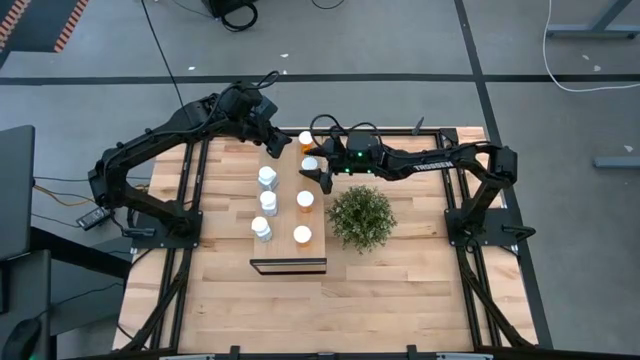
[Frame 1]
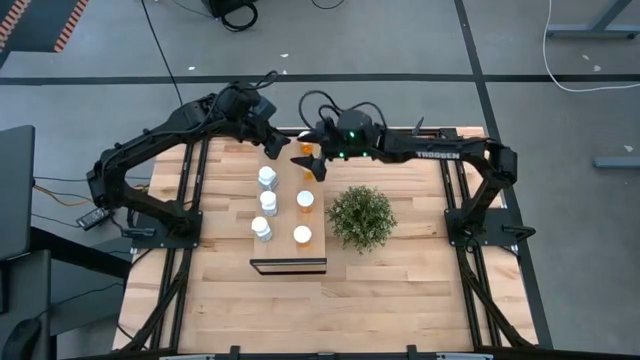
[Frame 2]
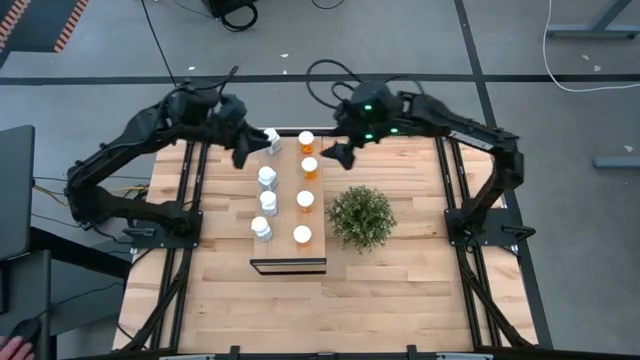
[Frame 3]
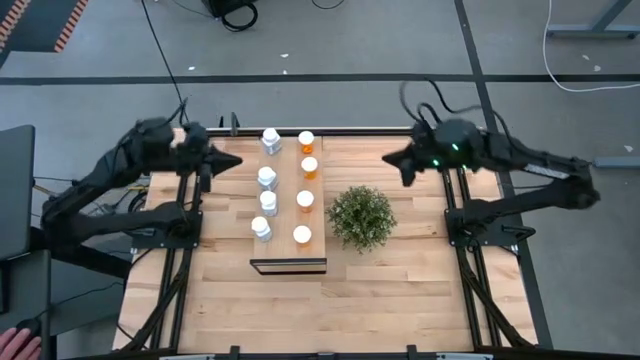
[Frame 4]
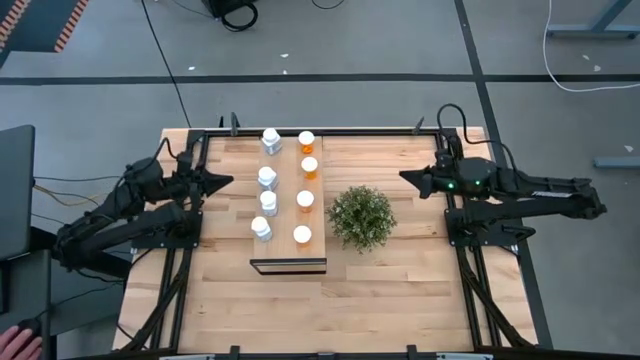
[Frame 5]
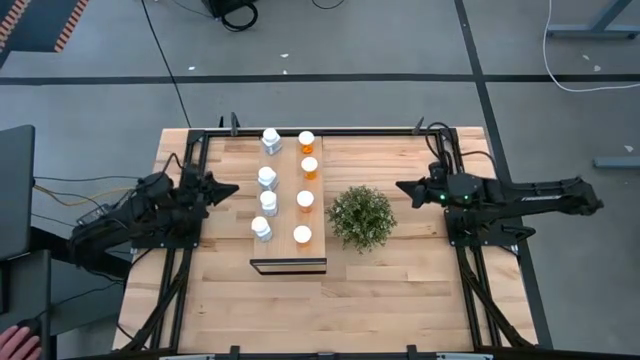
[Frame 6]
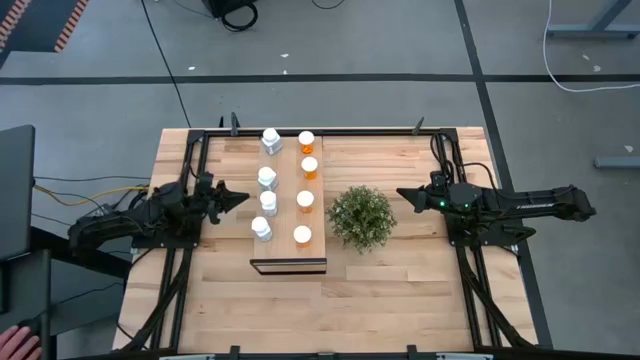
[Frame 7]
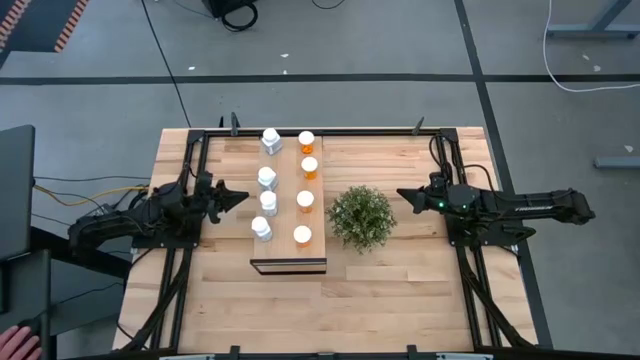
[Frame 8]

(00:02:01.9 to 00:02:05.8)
Task: Pick and place medicine bottles onto shelf by color
Return to Home Position

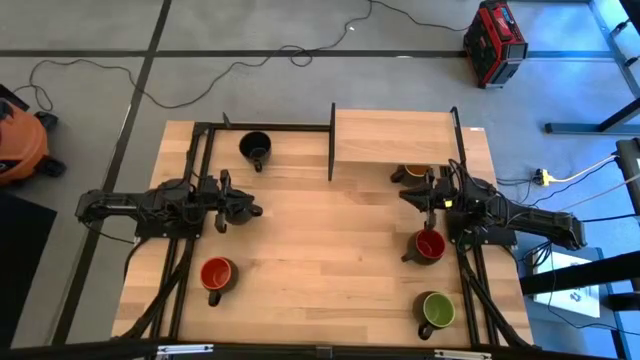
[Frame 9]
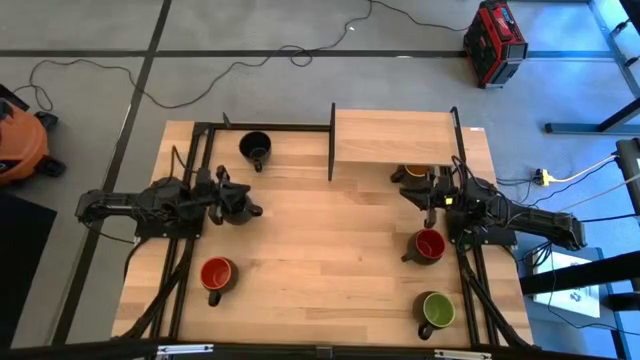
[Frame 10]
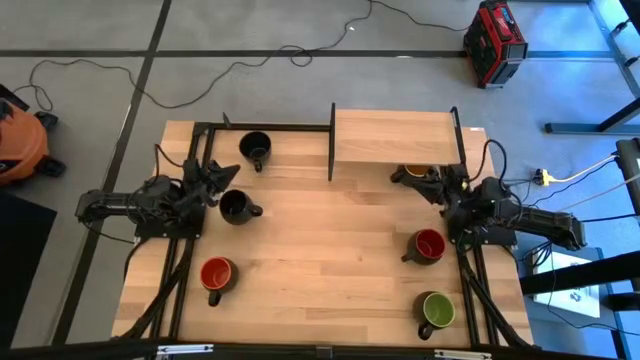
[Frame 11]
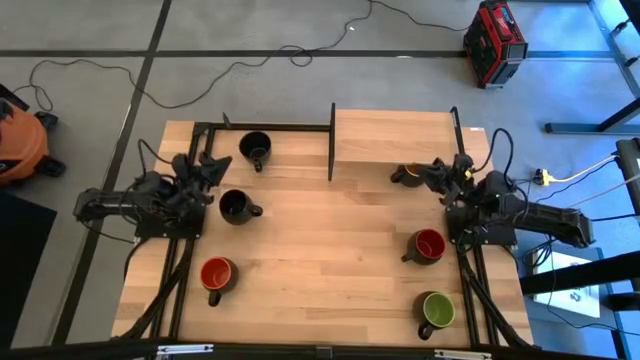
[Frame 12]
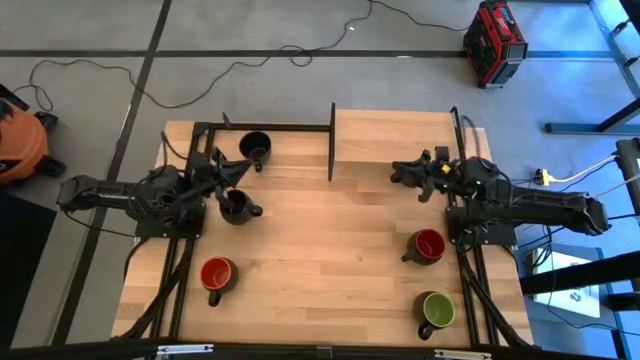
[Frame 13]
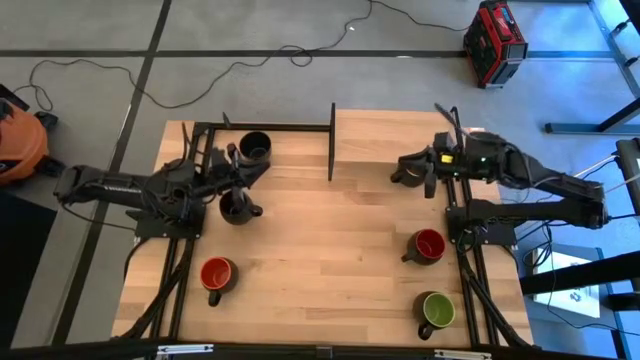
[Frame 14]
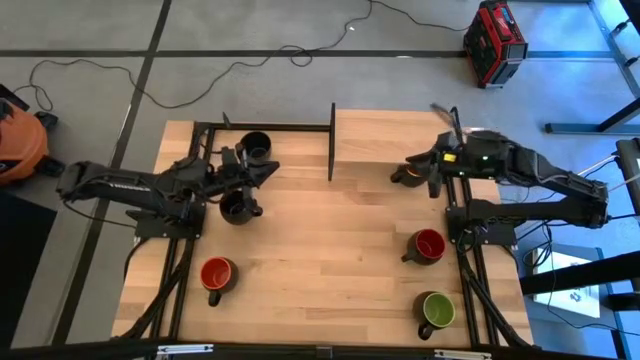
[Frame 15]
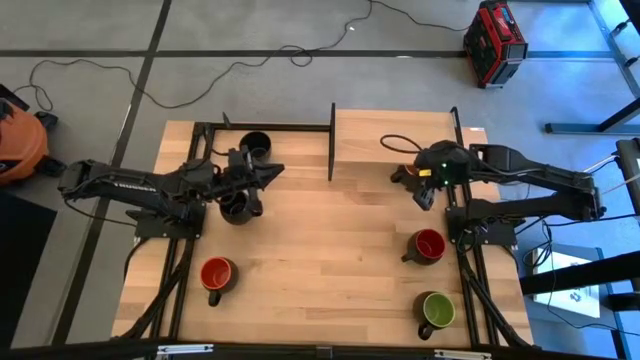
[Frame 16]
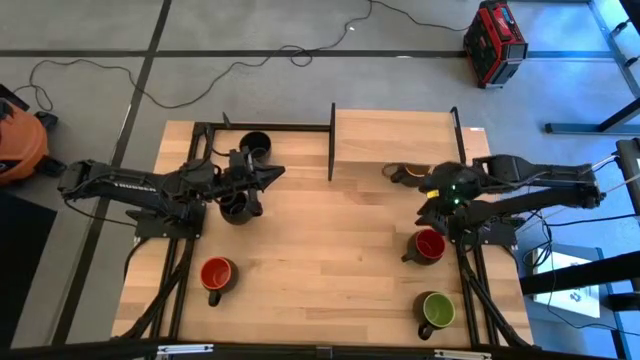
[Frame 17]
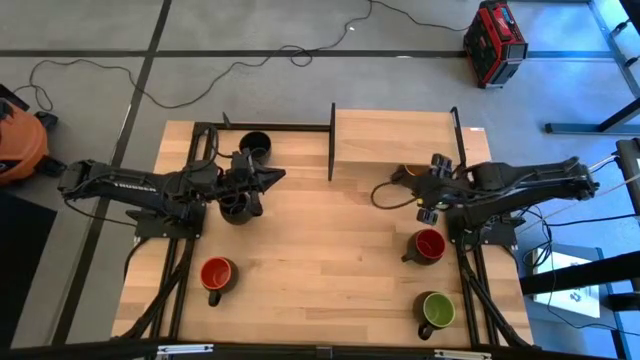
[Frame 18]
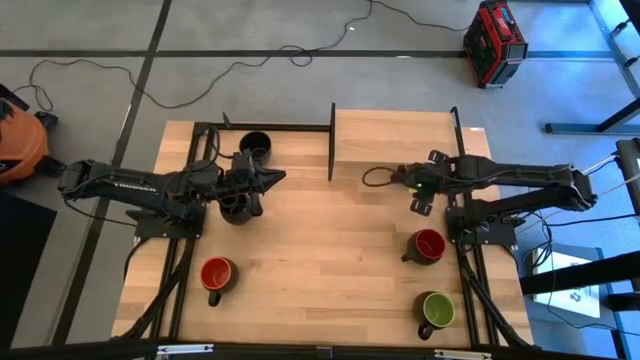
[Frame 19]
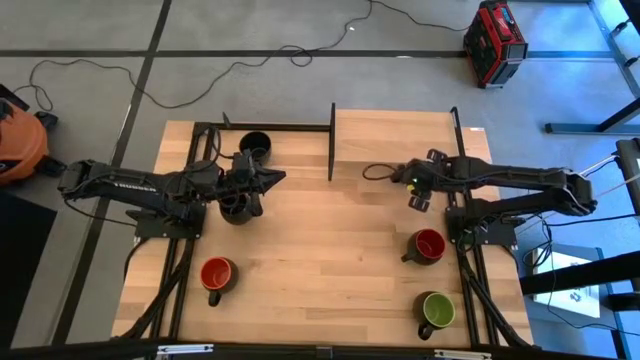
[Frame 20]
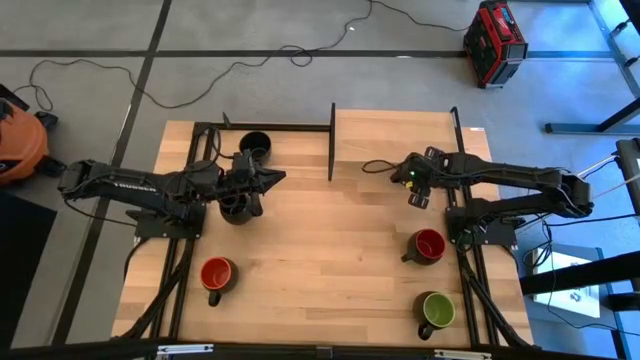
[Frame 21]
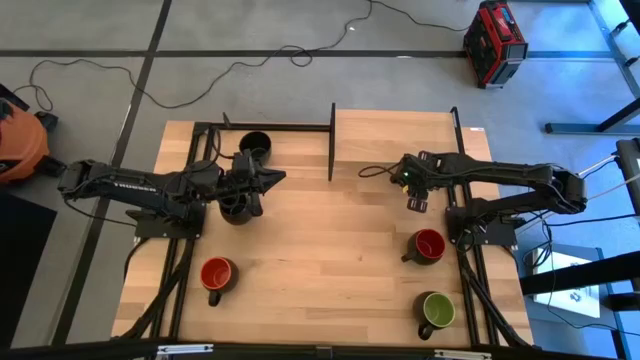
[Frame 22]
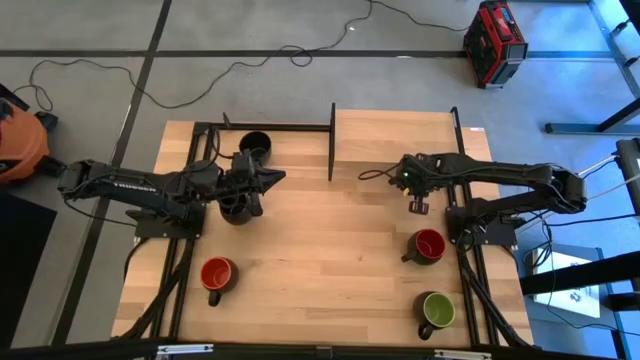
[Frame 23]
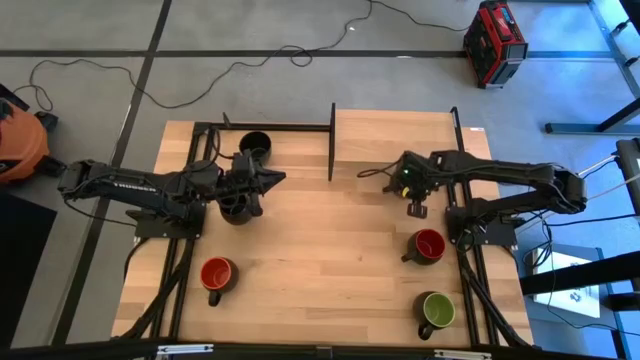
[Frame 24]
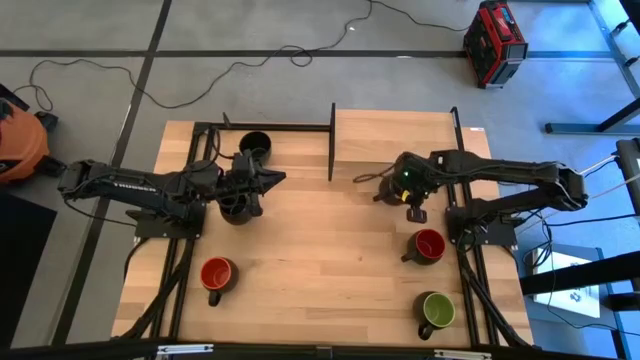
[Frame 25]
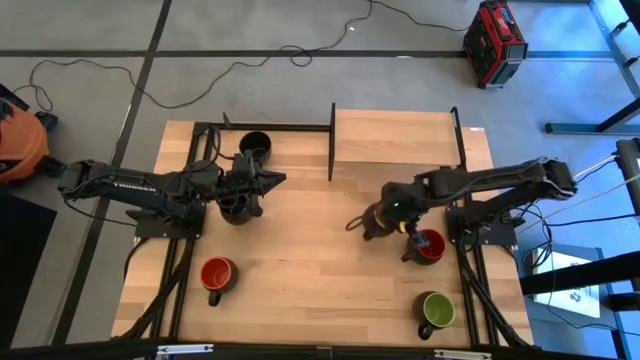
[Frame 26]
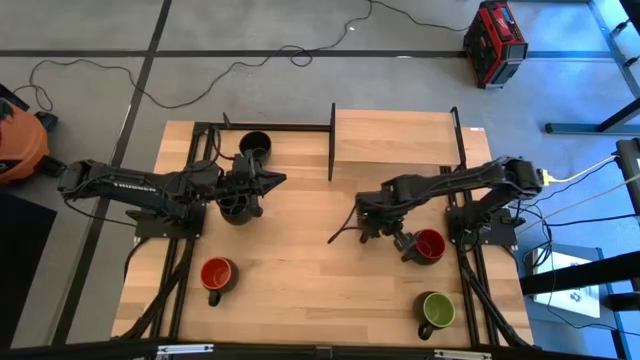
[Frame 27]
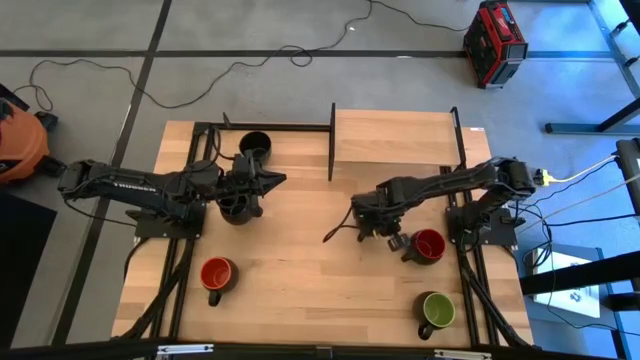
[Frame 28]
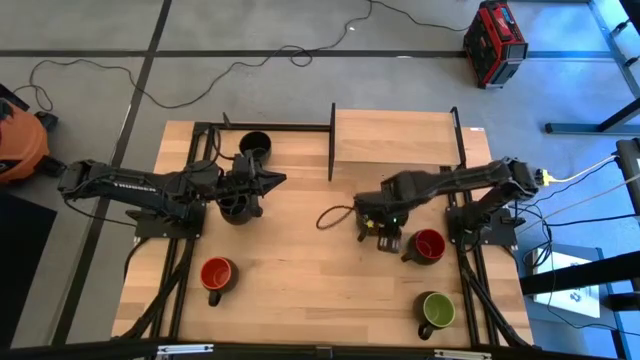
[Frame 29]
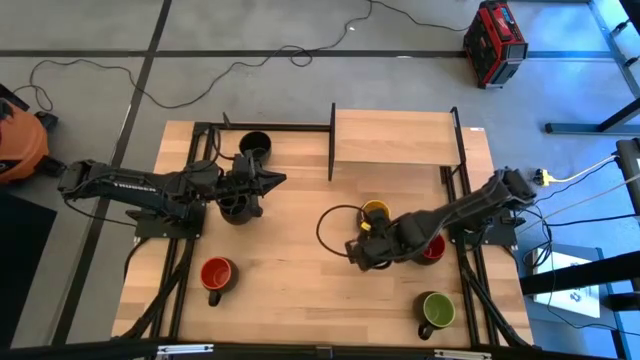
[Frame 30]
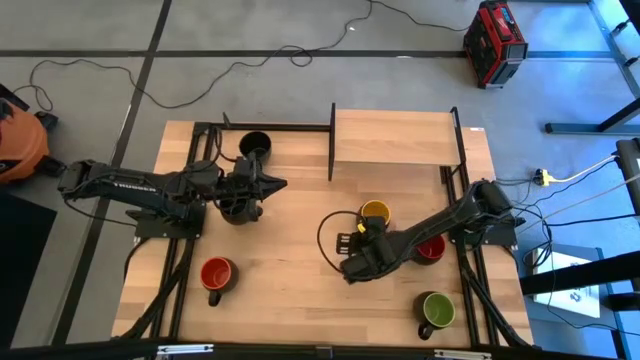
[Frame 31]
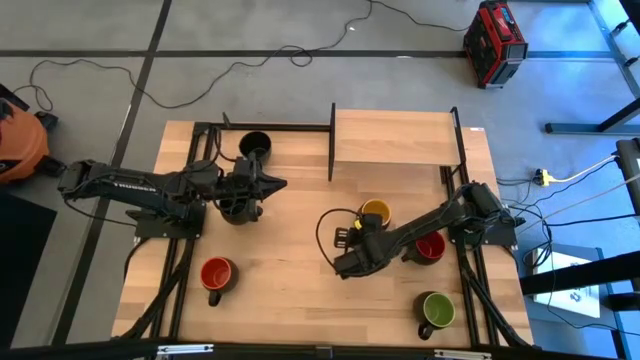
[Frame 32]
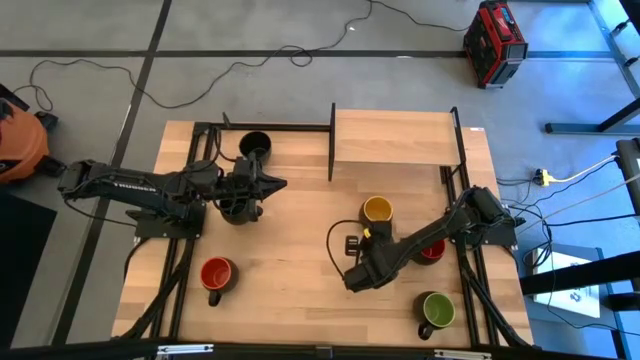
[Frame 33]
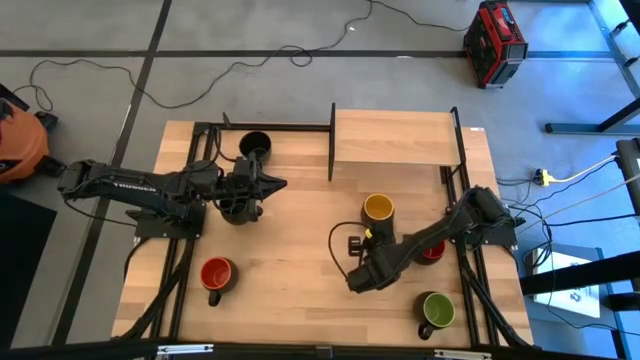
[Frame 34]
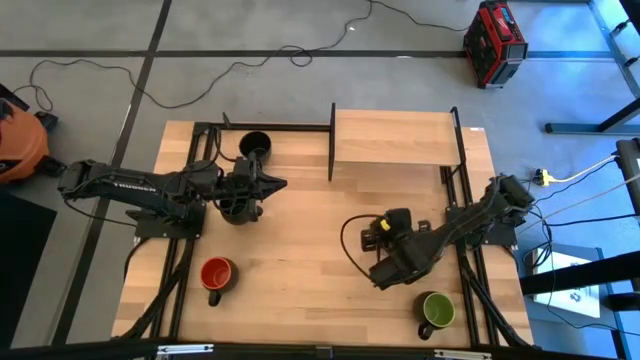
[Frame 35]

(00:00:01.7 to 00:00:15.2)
Task: Place coffee mugs
Put the yellow mug on the shelf
